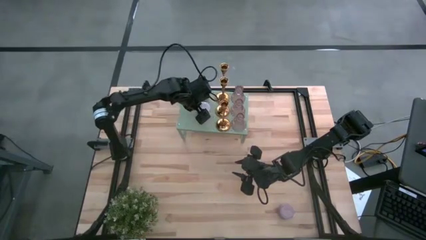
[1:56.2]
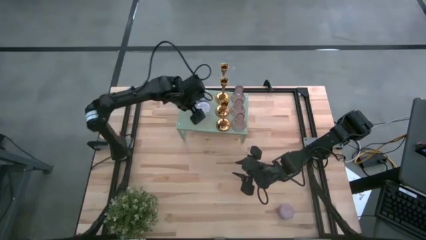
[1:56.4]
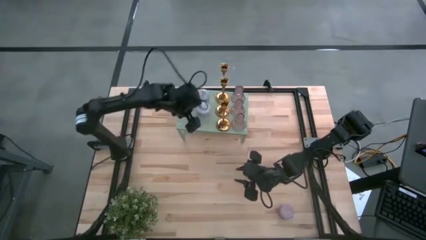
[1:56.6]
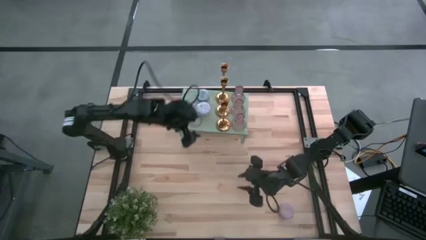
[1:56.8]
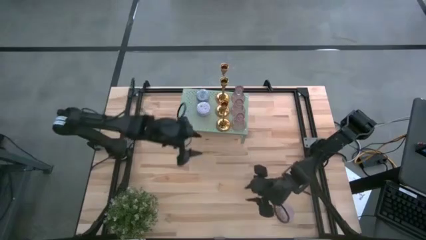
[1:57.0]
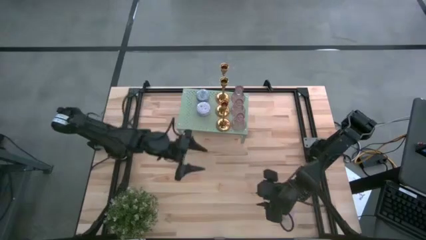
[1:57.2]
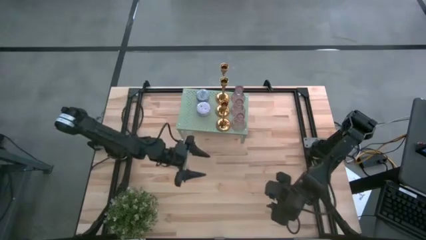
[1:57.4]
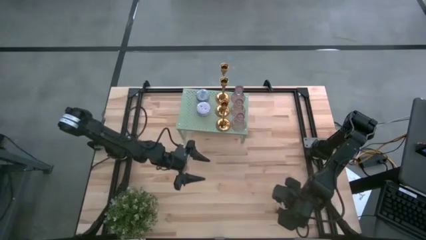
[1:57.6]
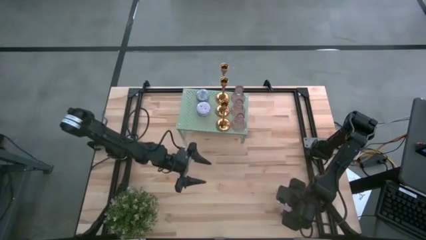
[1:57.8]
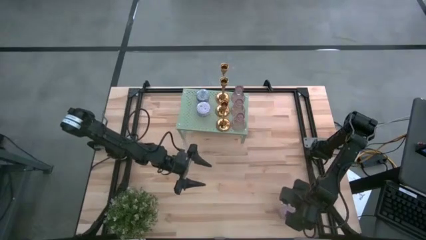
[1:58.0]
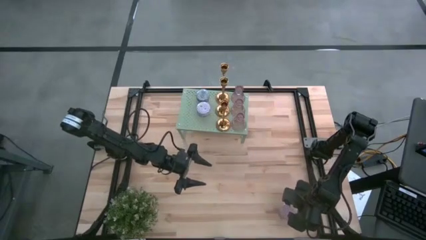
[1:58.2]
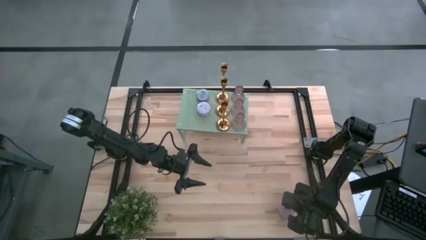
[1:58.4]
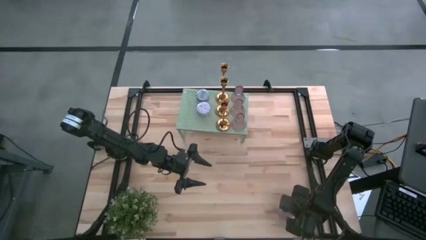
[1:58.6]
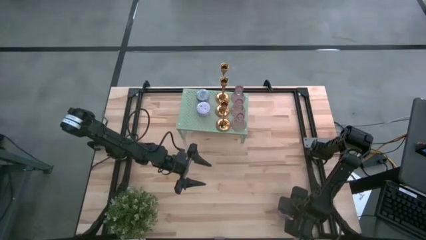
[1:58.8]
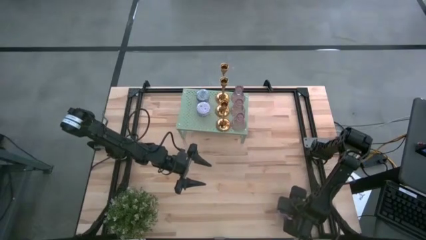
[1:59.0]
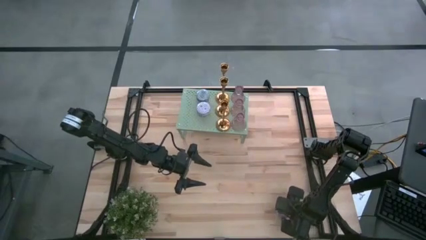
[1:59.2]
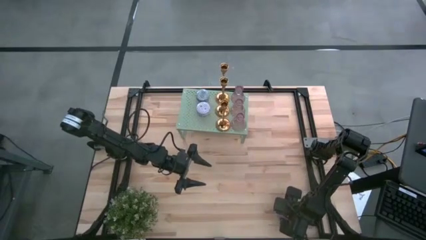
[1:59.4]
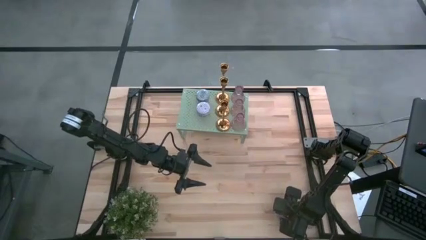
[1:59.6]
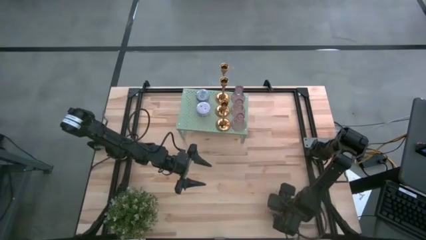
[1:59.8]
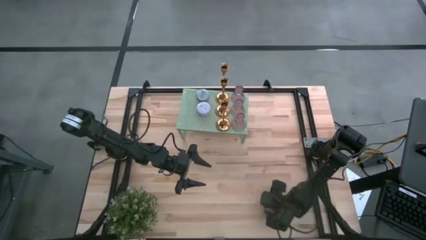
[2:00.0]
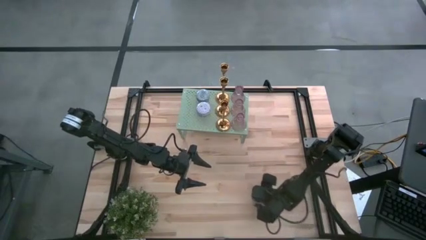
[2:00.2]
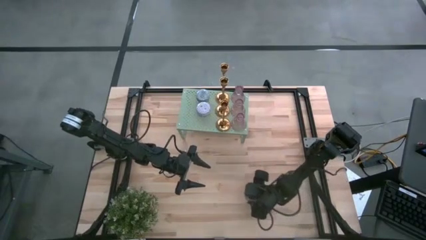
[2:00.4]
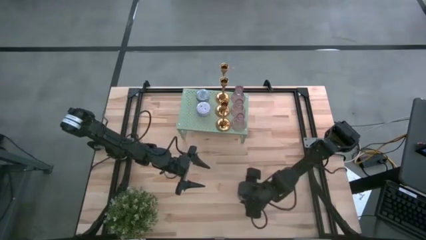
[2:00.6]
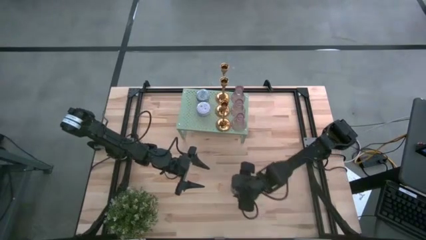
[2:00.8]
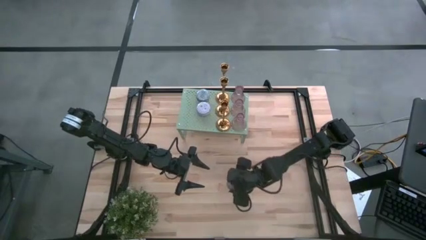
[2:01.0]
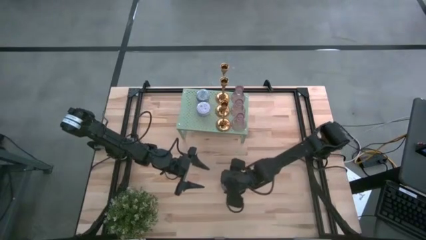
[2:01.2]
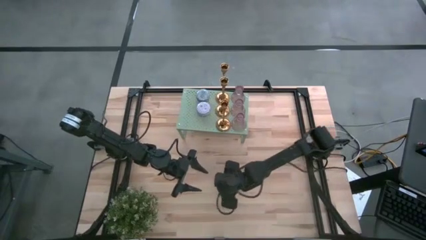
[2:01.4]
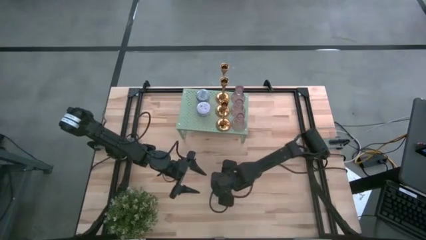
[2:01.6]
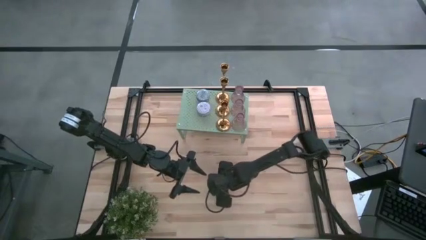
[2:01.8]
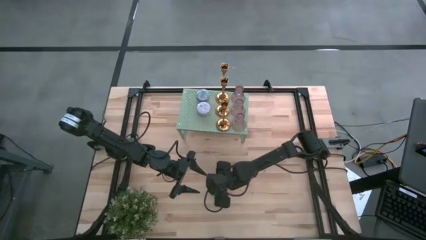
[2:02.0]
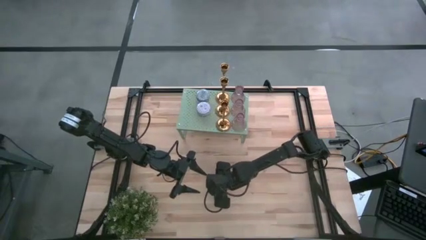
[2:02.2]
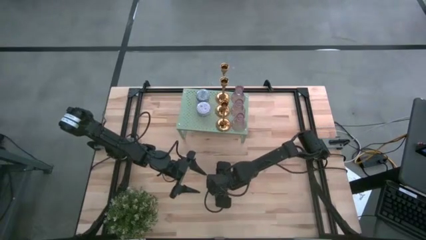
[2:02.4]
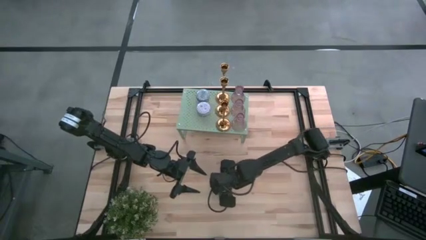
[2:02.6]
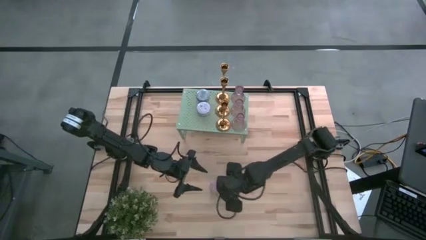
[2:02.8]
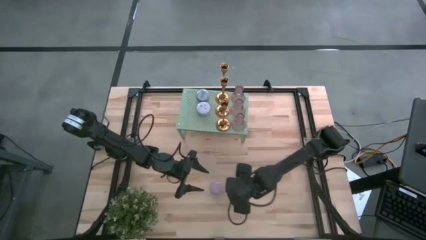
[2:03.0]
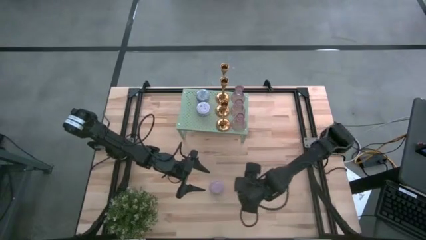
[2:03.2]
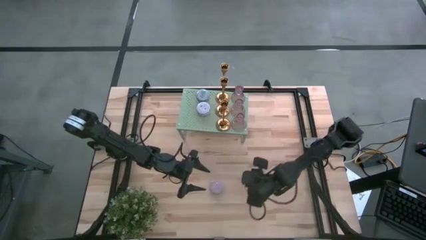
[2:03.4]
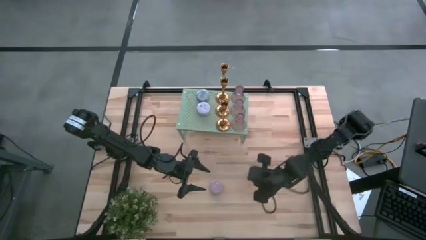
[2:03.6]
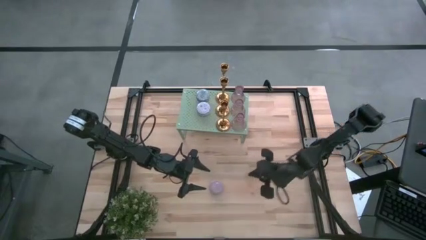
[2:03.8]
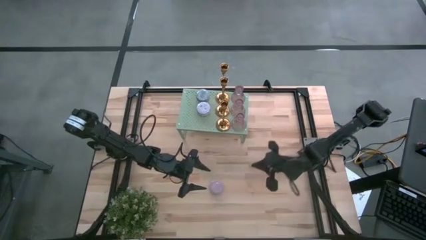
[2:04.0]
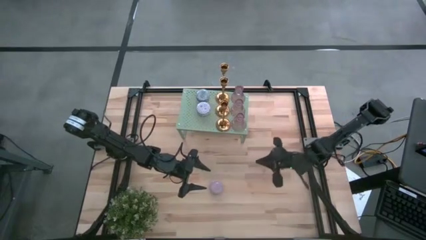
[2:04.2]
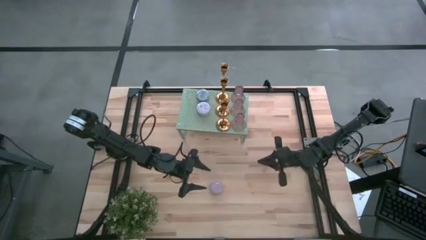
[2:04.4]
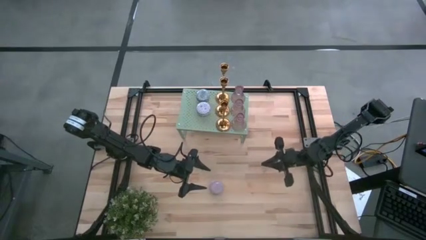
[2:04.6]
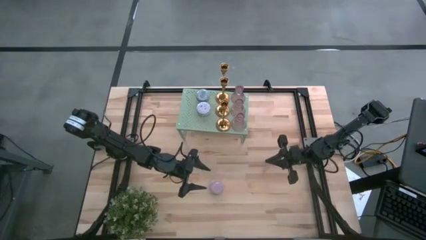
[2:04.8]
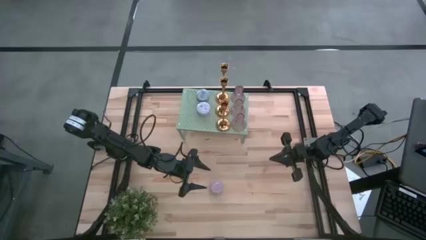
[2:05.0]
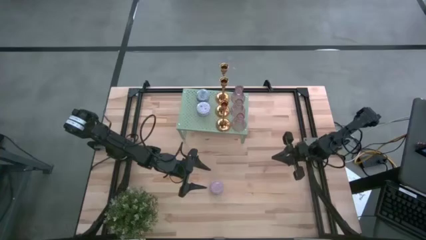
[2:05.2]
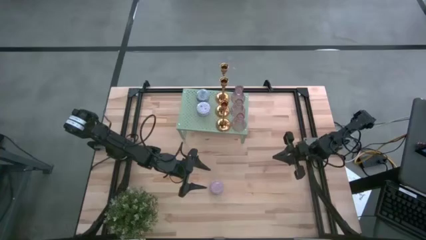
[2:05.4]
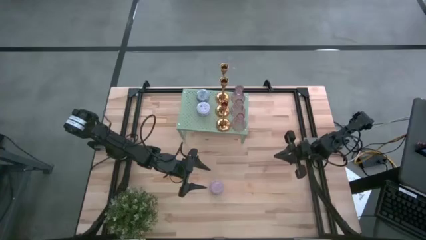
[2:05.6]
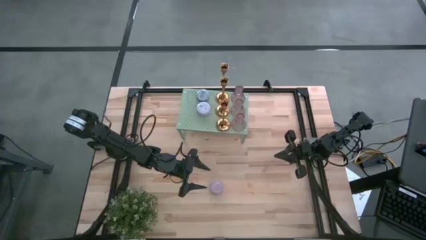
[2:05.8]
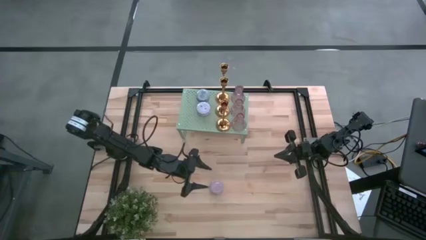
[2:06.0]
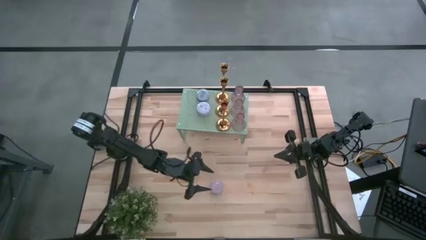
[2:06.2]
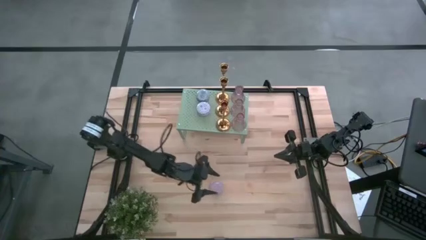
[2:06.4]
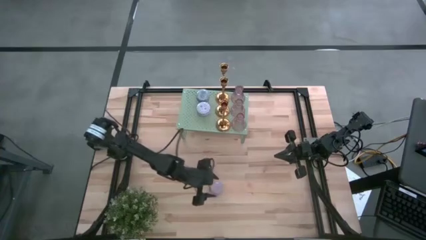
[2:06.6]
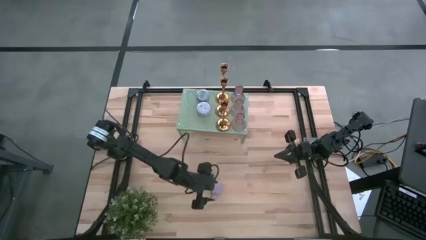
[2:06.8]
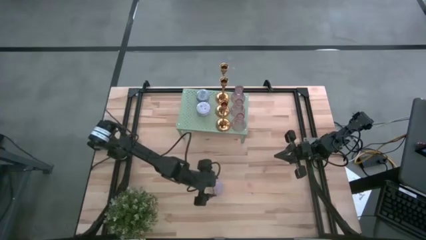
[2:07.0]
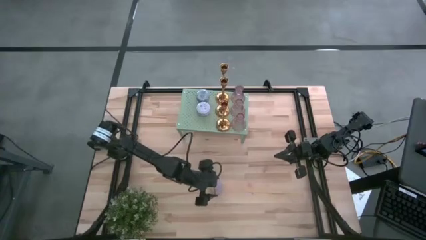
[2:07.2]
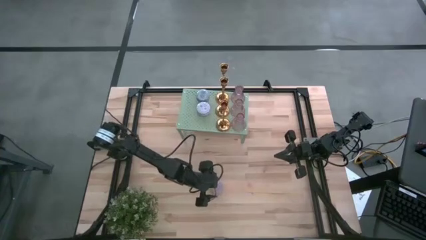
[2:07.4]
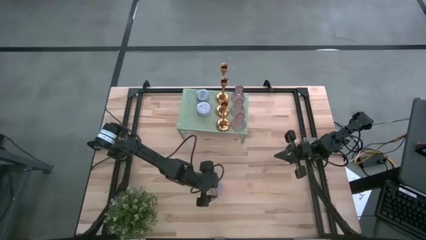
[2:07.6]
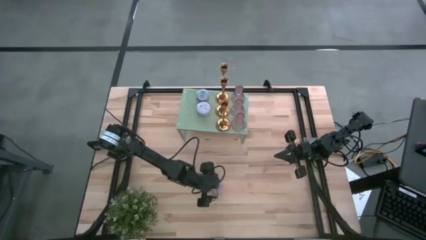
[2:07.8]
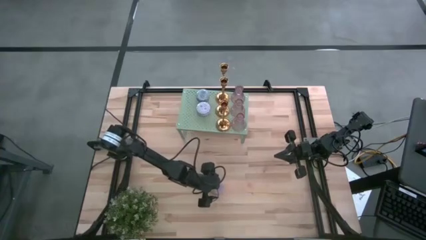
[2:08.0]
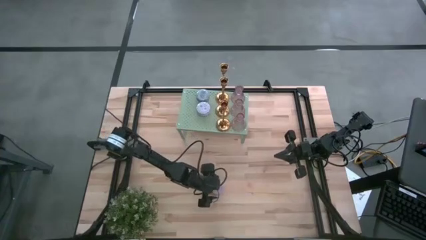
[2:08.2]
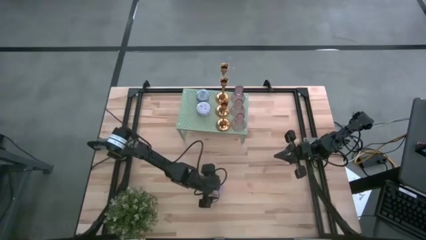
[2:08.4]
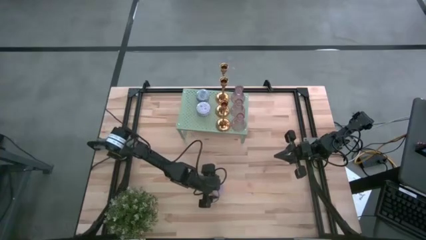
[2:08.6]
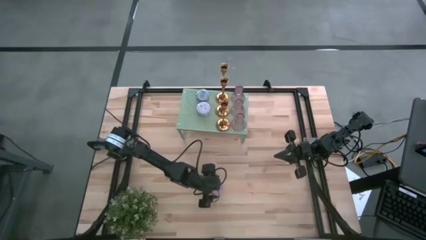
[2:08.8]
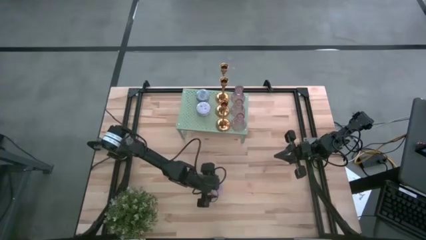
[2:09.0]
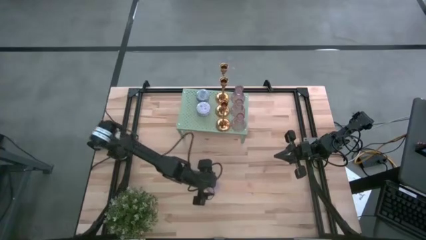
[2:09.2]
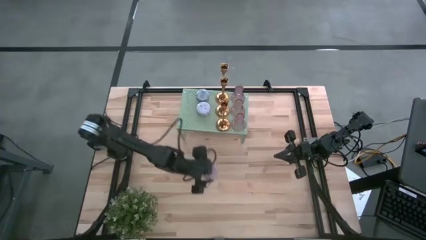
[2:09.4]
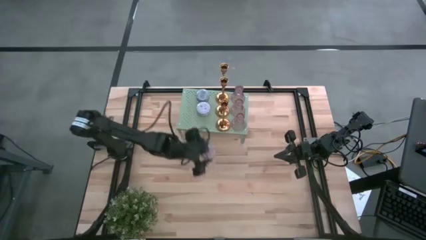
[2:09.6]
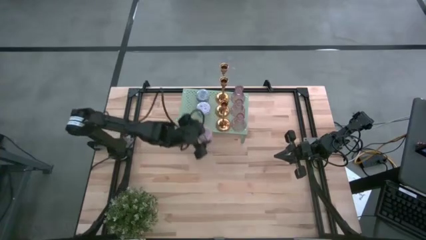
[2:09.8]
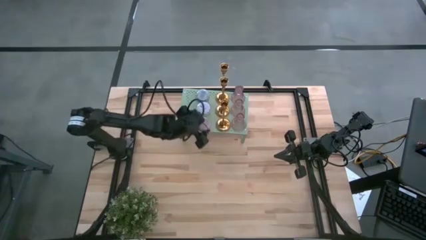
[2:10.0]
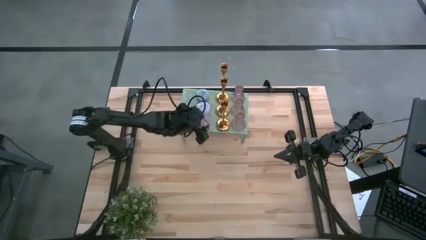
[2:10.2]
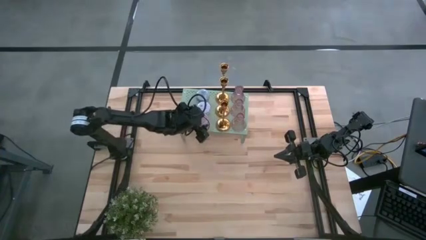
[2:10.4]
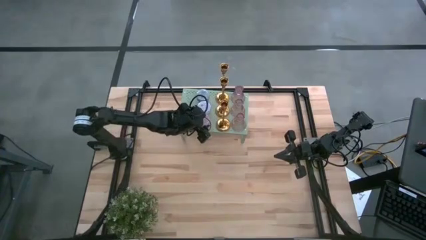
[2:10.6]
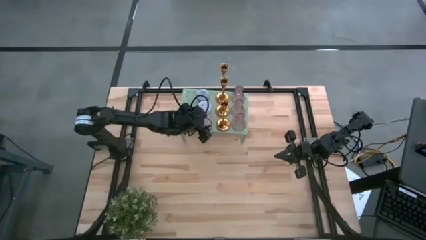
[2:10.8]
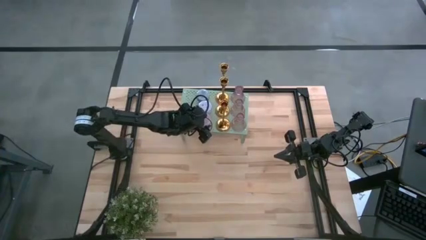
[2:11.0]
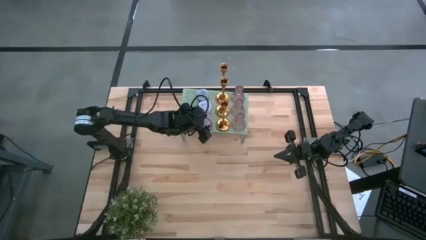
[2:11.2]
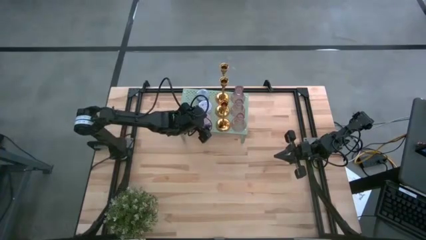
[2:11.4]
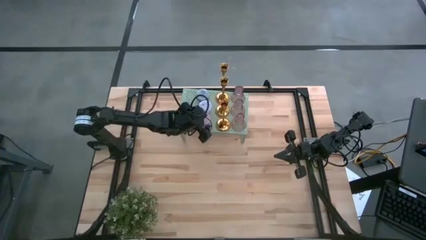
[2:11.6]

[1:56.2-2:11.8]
Task: Pick & Place candle stick holders
Put the pink scented candle on the shelf
